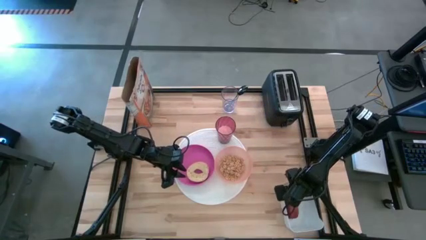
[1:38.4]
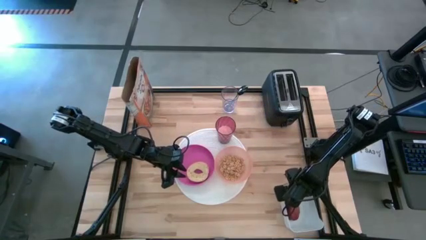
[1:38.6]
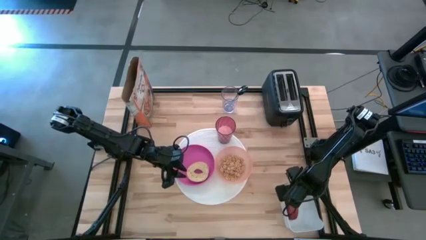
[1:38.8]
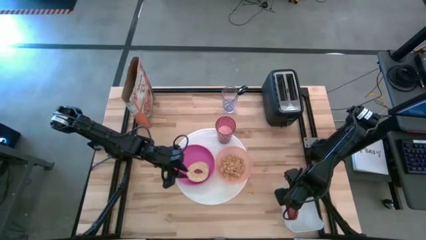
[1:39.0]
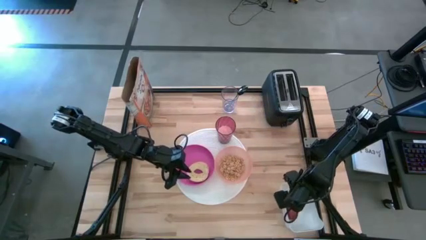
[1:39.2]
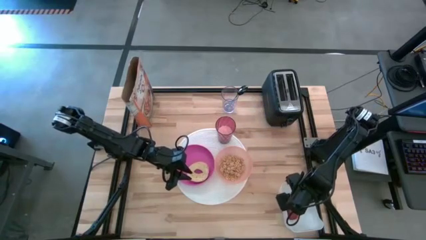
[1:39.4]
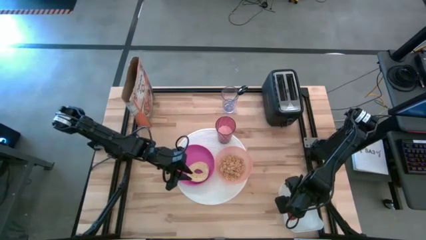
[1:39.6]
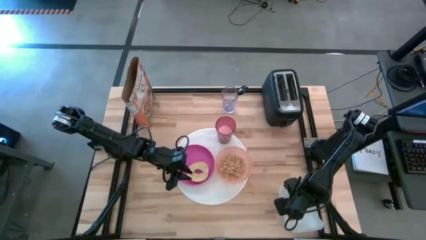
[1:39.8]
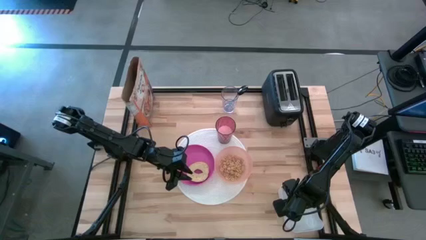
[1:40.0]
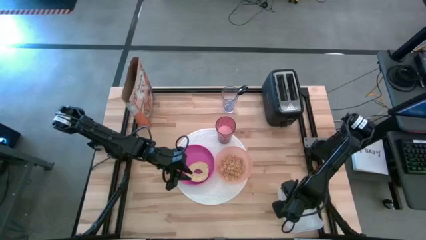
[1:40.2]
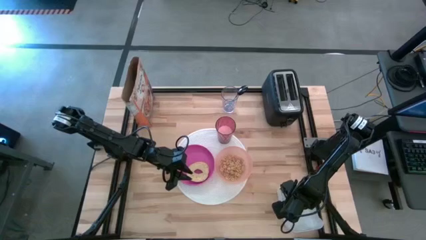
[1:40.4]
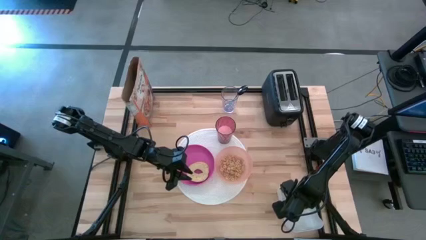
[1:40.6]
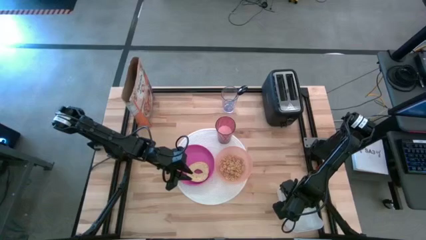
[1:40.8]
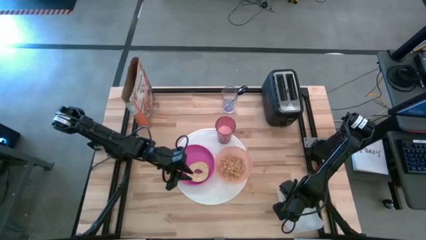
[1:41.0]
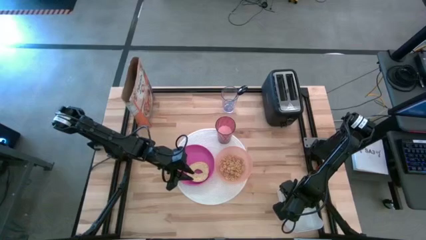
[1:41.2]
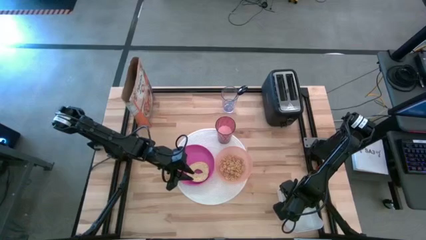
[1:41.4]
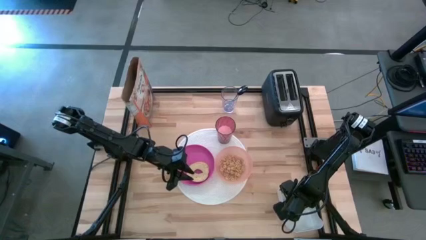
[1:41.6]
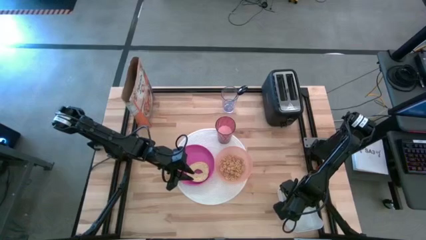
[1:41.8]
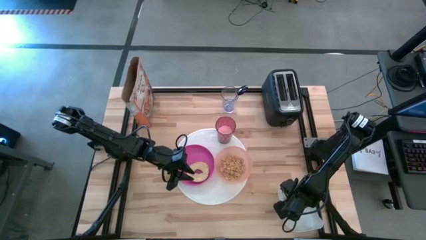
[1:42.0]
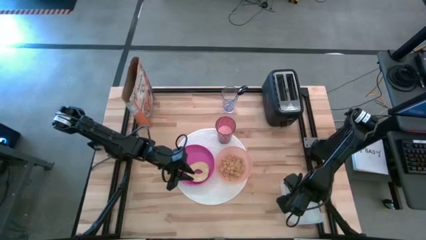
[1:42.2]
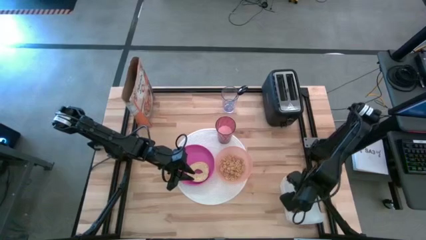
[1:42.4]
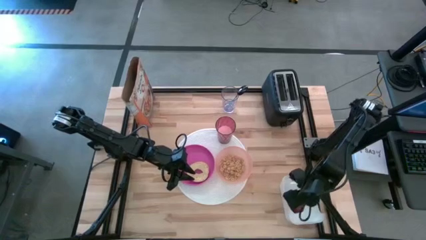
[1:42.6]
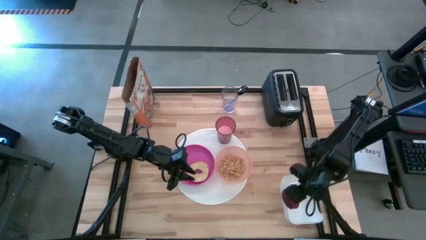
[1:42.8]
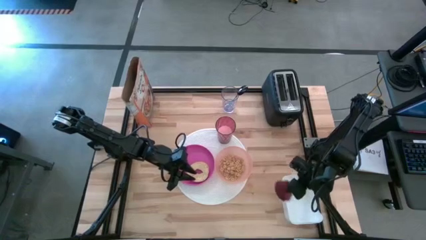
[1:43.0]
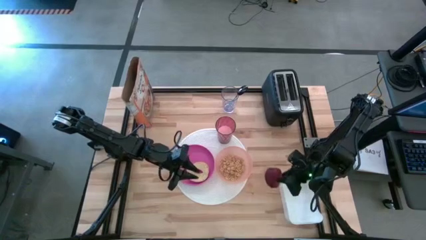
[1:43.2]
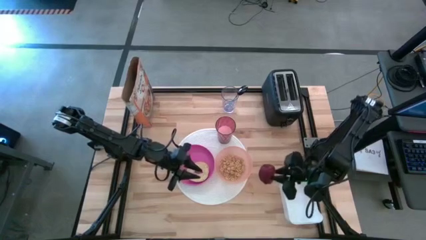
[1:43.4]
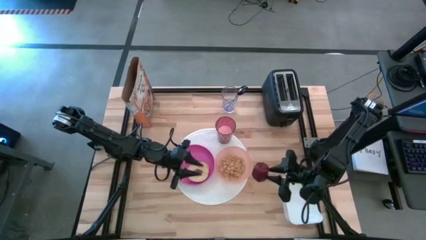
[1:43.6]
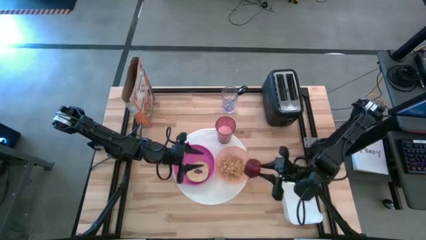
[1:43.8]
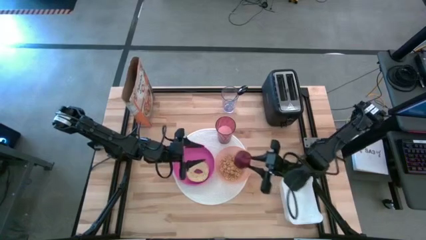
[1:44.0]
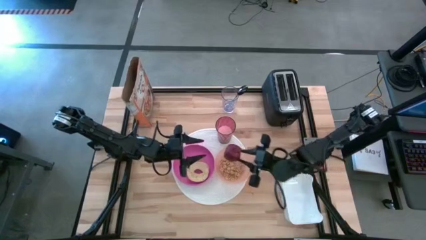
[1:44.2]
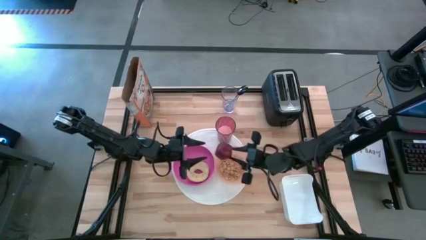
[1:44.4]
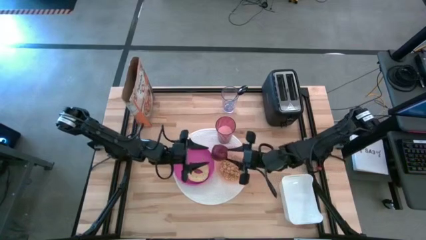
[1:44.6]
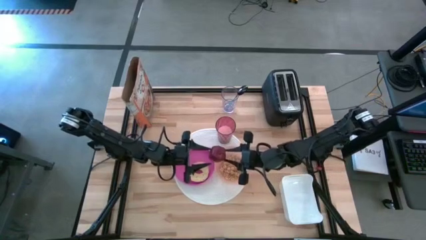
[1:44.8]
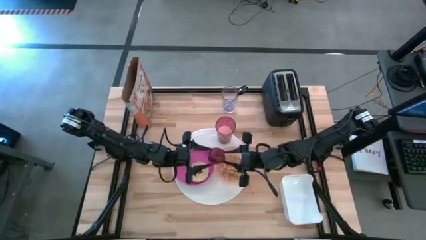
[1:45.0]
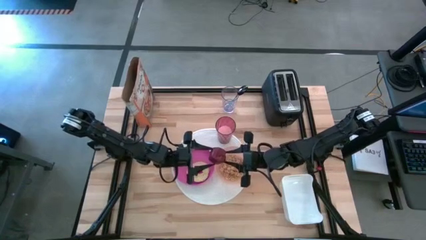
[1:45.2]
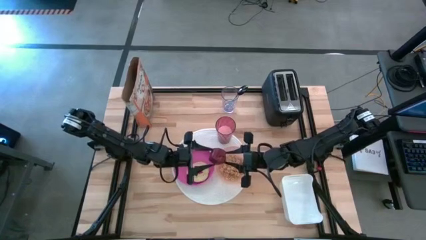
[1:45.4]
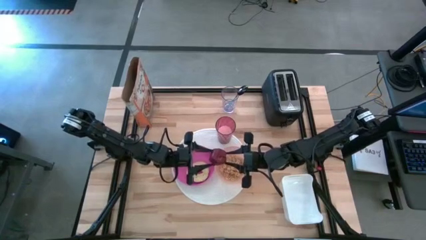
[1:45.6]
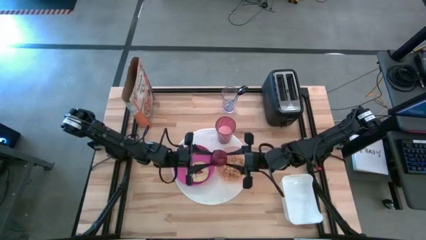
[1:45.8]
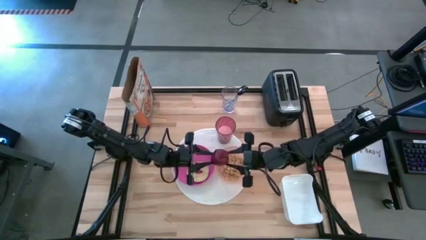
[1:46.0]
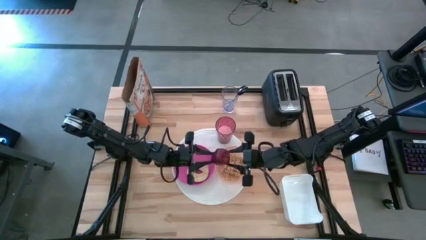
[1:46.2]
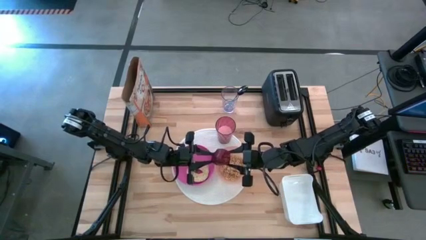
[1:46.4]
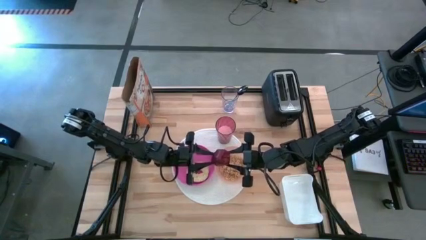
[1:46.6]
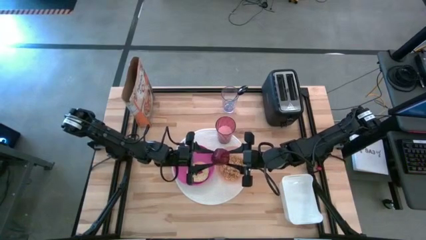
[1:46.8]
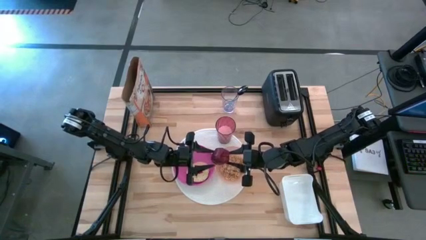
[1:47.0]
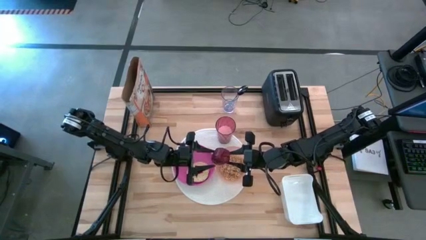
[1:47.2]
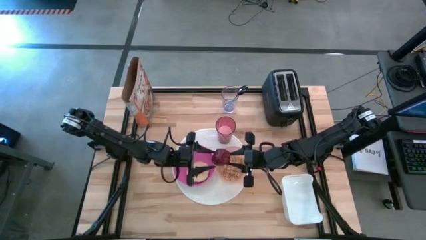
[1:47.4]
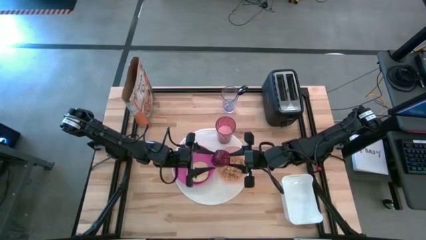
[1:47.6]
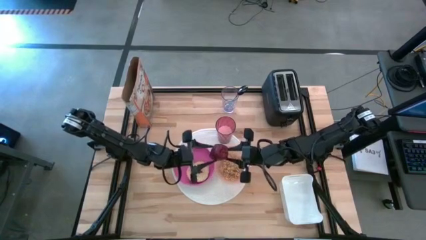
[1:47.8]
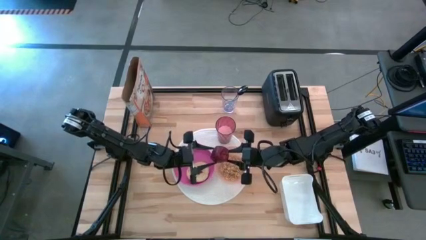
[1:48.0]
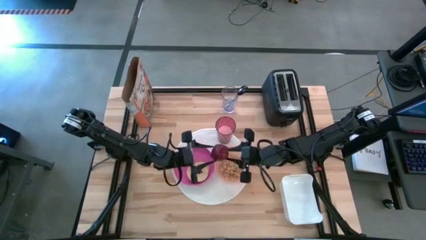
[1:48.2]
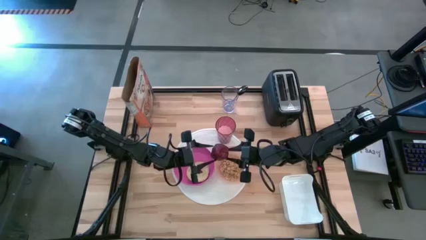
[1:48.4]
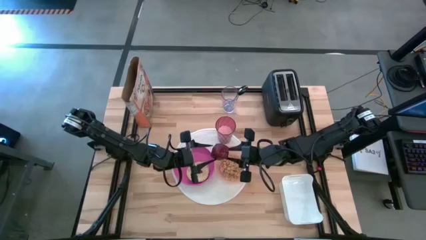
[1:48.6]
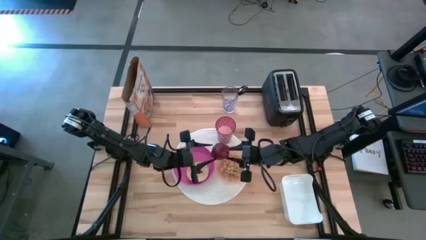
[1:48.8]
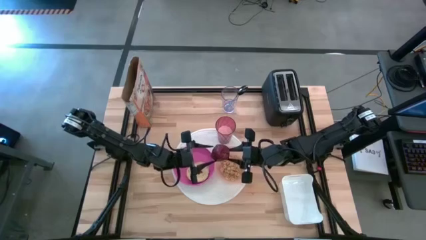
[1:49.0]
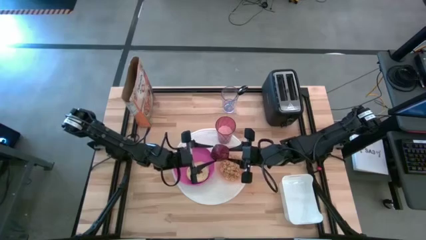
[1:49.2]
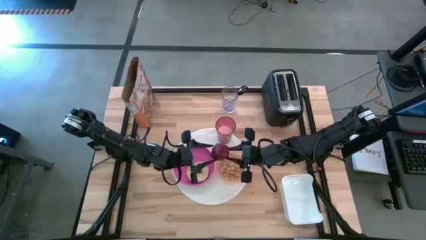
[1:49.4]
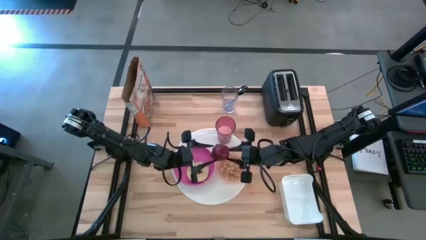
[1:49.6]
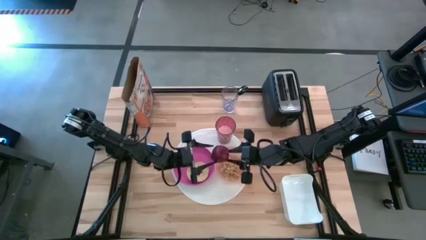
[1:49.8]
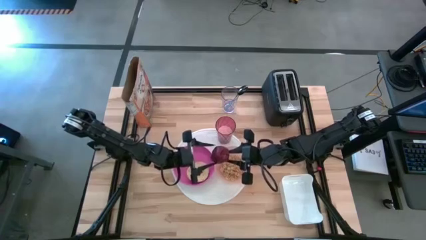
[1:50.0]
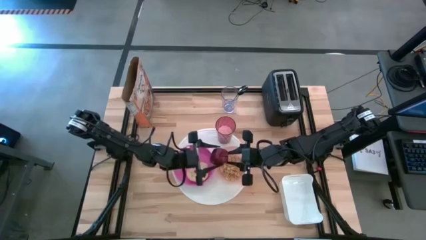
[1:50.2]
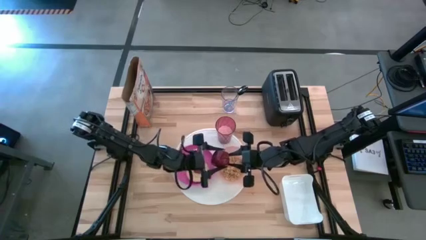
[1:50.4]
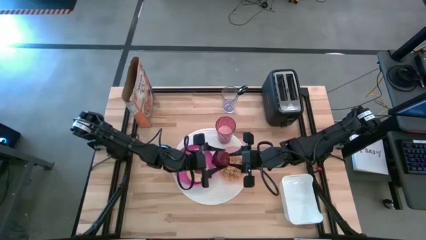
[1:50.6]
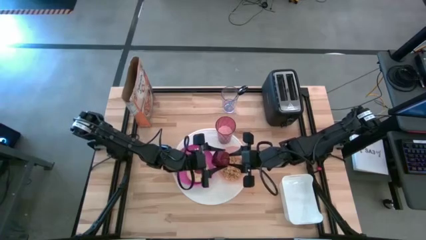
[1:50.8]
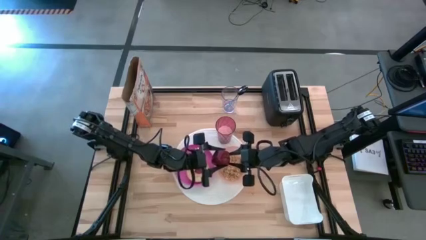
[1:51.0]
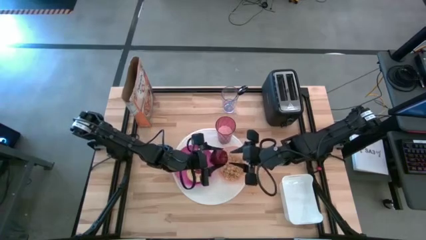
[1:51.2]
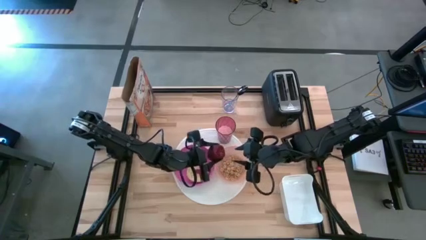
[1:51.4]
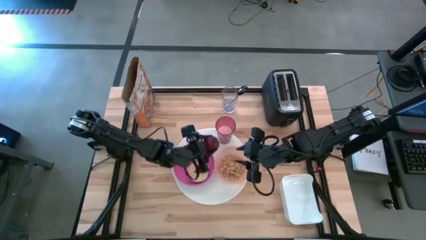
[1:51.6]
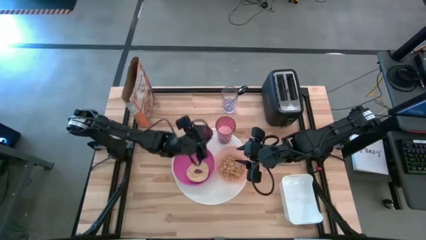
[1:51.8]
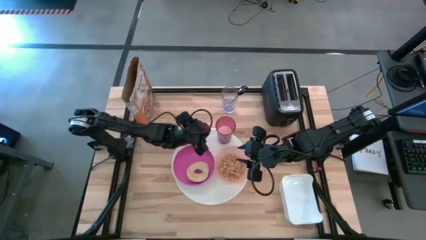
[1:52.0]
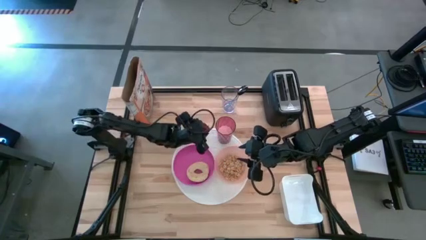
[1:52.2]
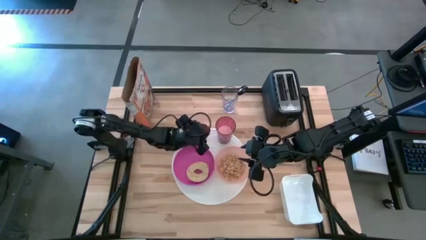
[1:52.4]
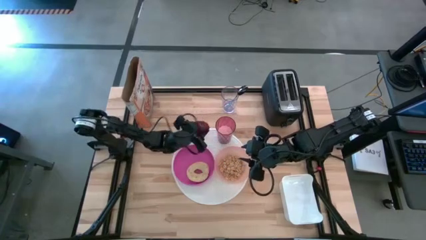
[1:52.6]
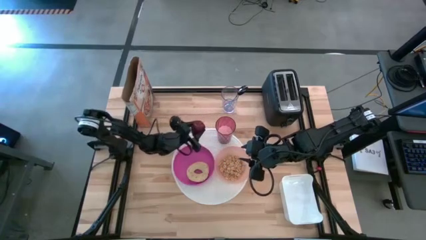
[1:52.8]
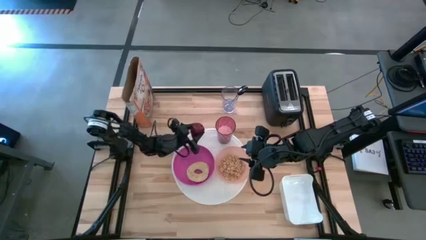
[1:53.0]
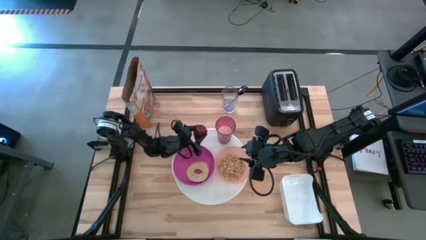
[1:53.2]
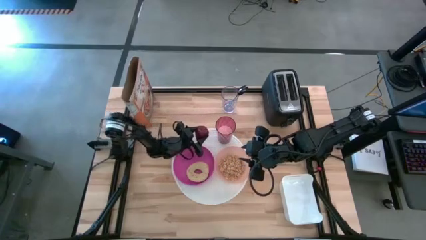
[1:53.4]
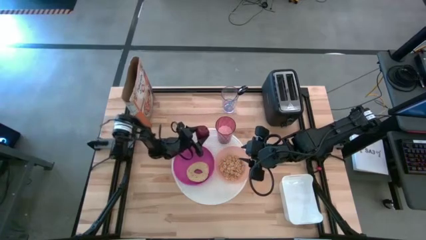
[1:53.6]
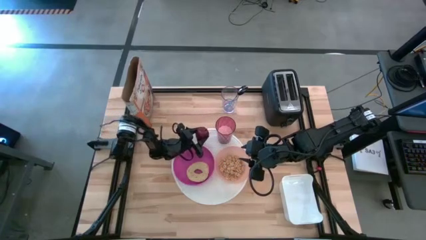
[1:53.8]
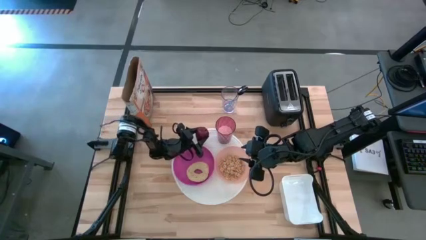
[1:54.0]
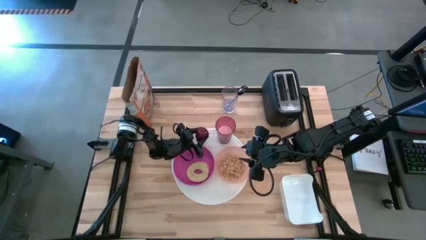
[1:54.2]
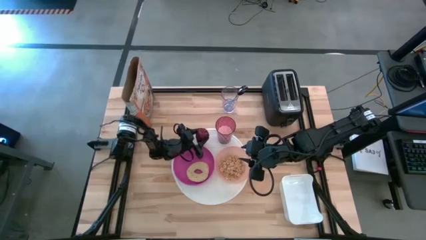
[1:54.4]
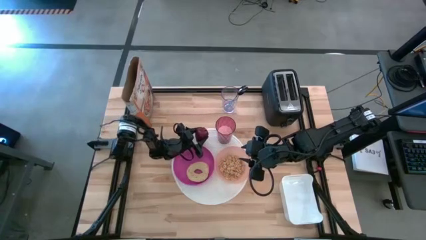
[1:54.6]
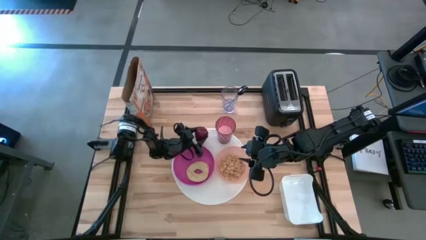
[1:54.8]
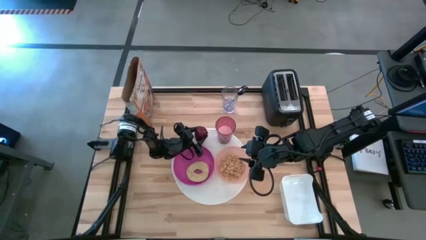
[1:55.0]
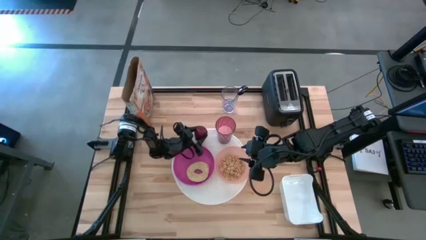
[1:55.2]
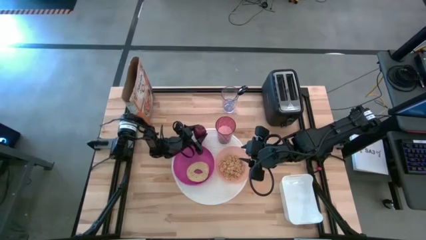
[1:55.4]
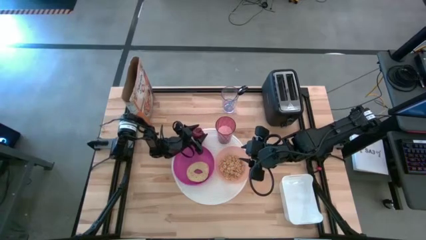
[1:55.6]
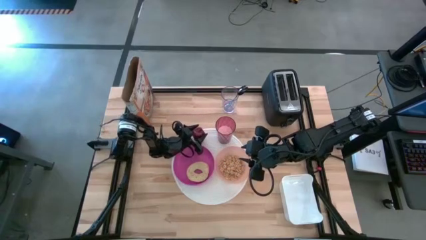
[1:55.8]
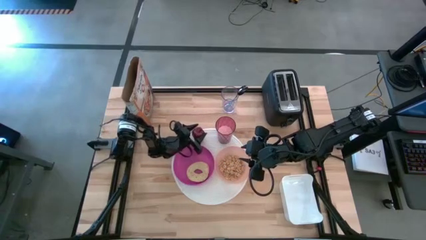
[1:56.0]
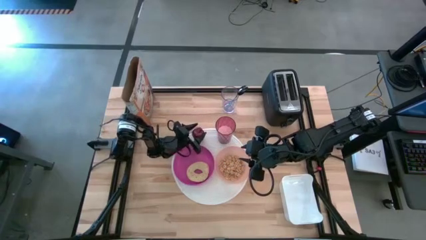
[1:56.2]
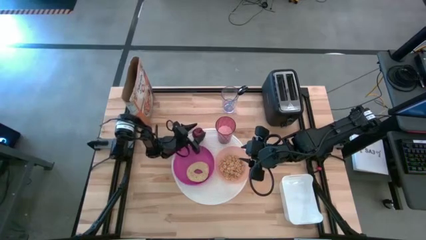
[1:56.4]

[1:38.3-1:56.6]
Task: Arrange a breakfast setting
Put the apple from the white bin to the top of the pink plate on the white mat
